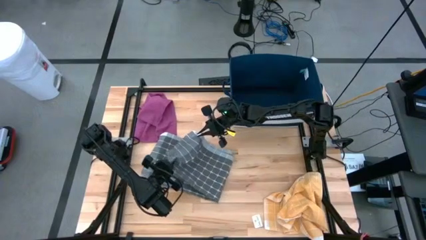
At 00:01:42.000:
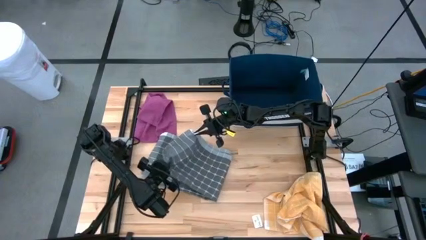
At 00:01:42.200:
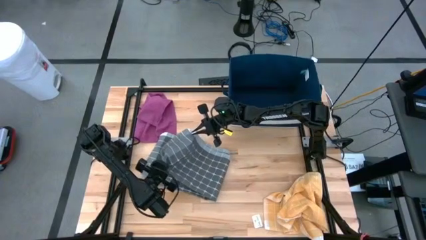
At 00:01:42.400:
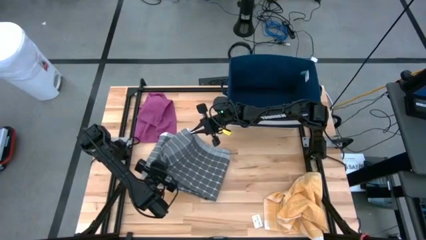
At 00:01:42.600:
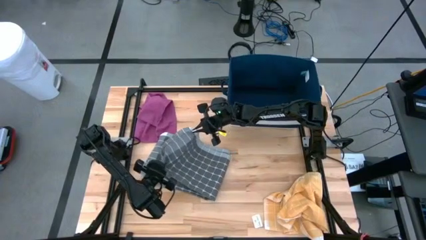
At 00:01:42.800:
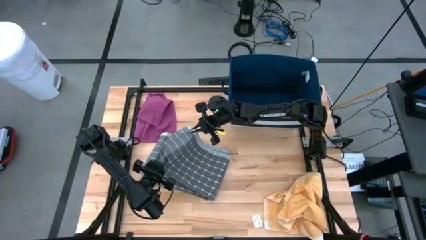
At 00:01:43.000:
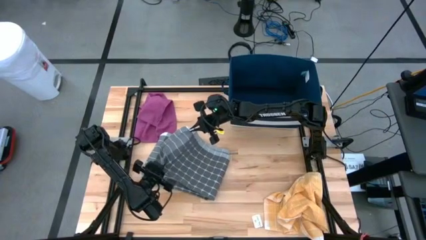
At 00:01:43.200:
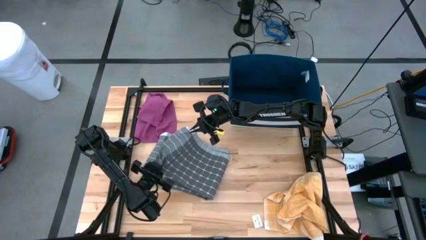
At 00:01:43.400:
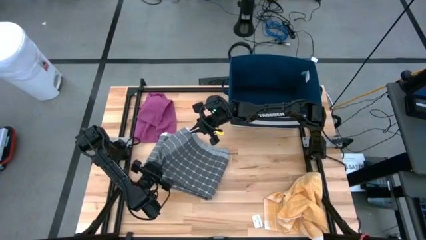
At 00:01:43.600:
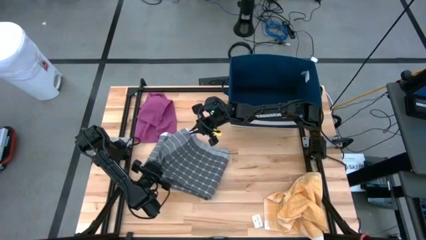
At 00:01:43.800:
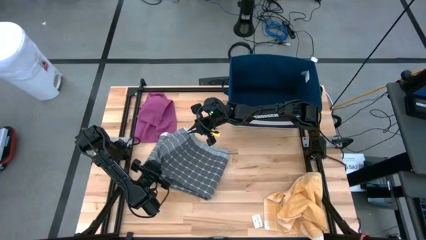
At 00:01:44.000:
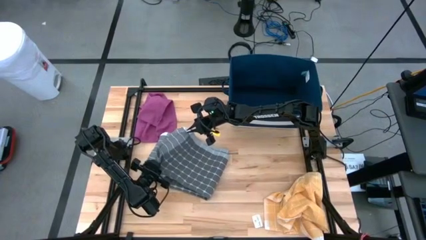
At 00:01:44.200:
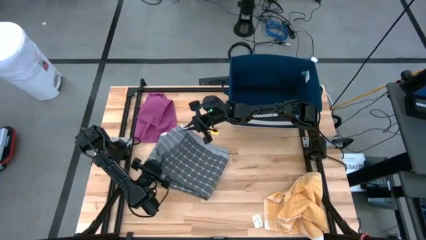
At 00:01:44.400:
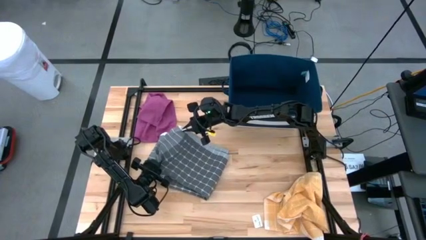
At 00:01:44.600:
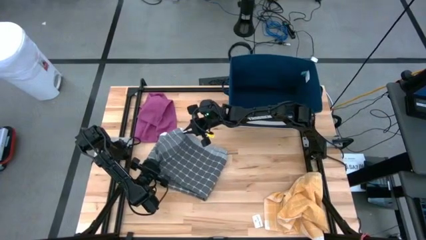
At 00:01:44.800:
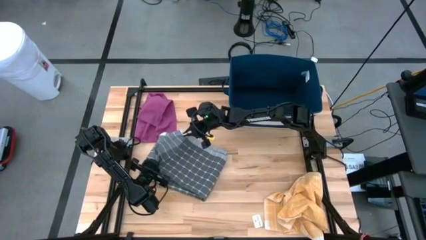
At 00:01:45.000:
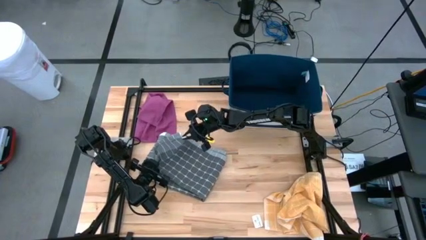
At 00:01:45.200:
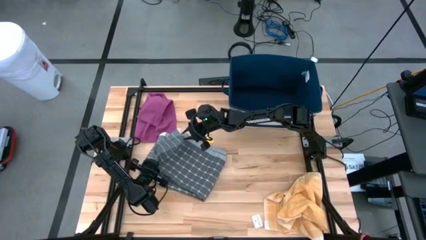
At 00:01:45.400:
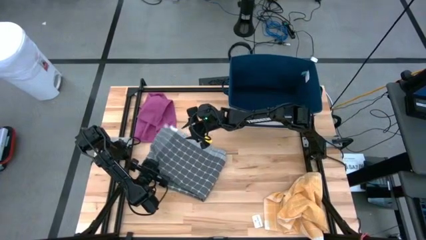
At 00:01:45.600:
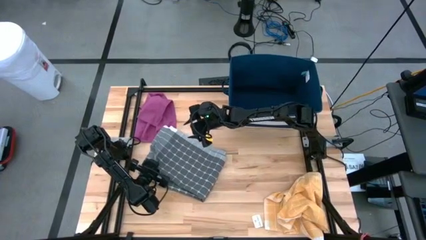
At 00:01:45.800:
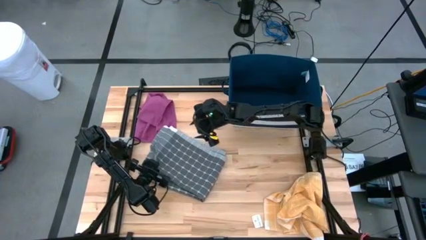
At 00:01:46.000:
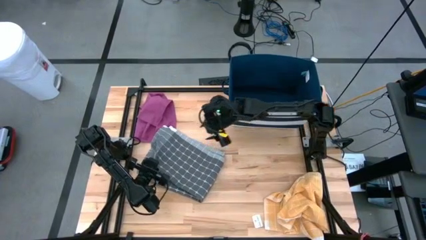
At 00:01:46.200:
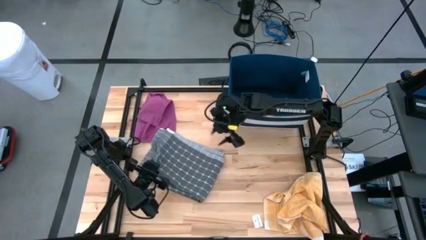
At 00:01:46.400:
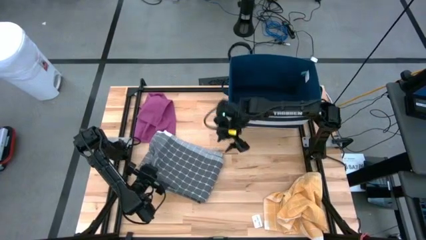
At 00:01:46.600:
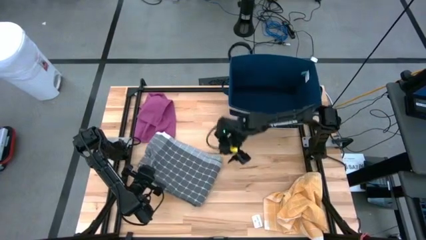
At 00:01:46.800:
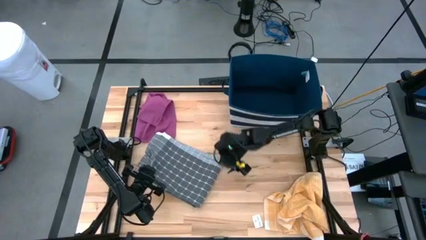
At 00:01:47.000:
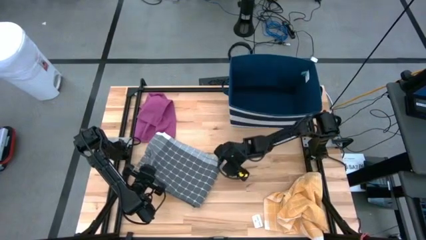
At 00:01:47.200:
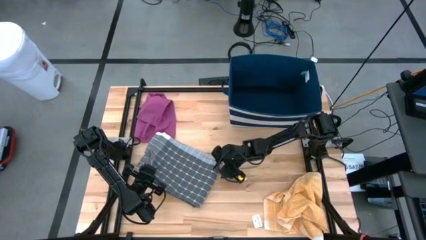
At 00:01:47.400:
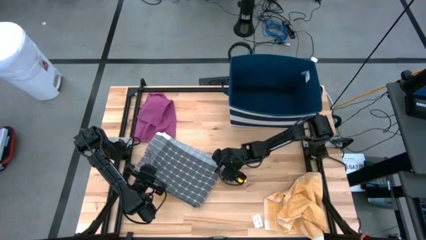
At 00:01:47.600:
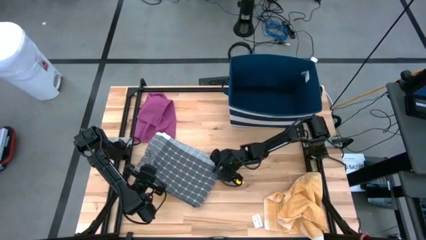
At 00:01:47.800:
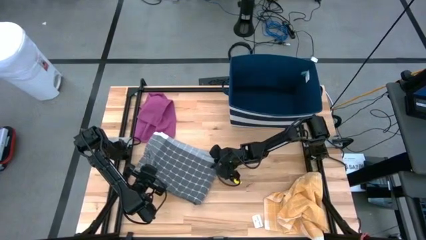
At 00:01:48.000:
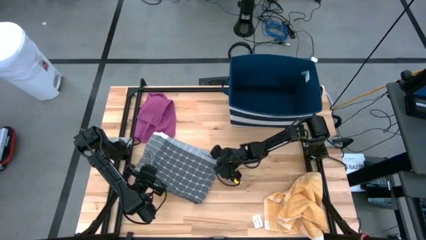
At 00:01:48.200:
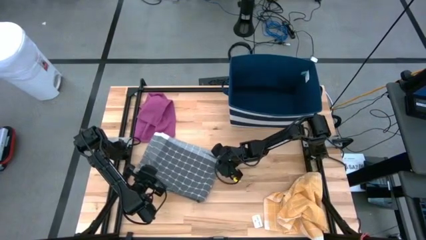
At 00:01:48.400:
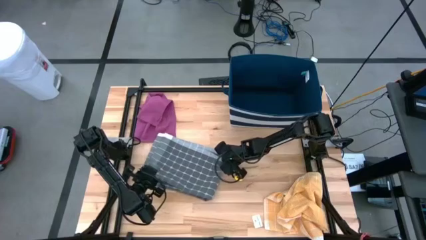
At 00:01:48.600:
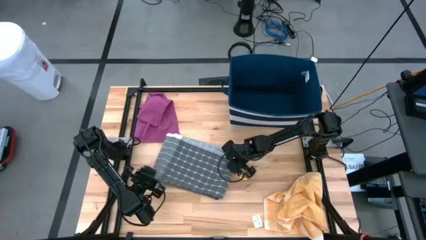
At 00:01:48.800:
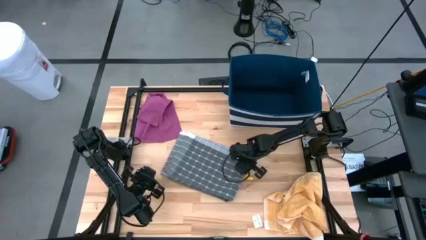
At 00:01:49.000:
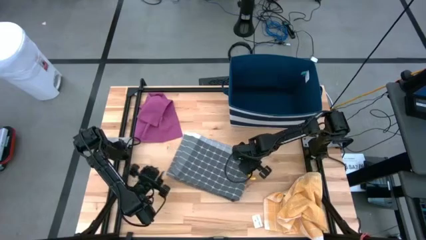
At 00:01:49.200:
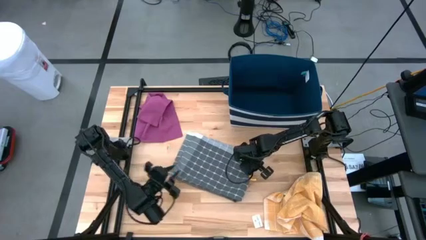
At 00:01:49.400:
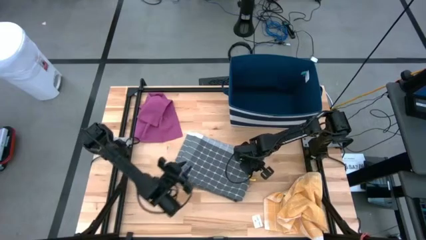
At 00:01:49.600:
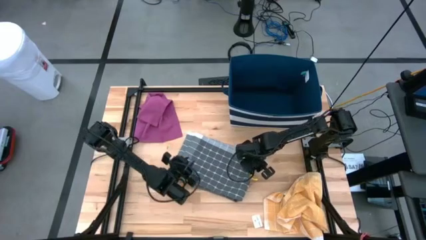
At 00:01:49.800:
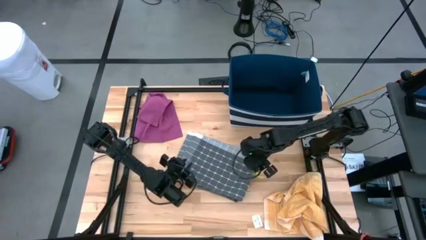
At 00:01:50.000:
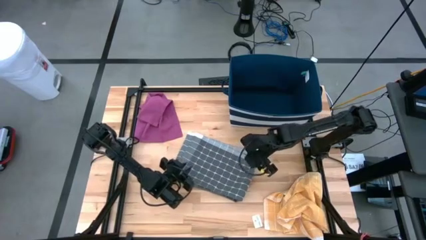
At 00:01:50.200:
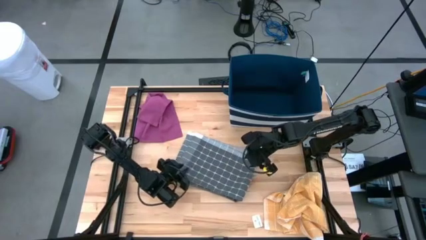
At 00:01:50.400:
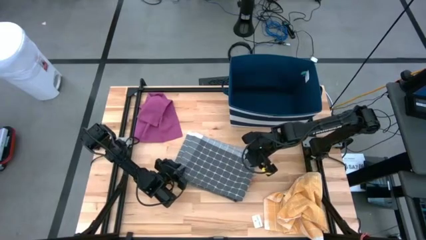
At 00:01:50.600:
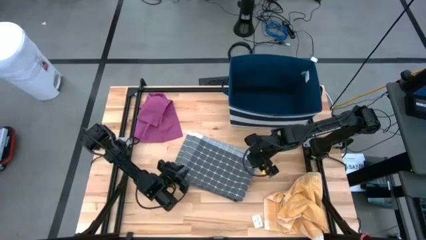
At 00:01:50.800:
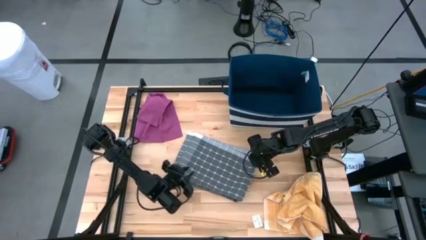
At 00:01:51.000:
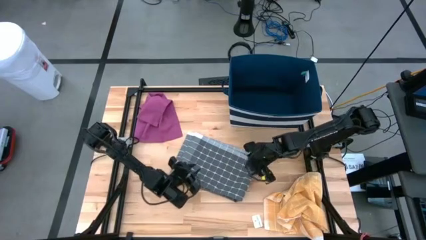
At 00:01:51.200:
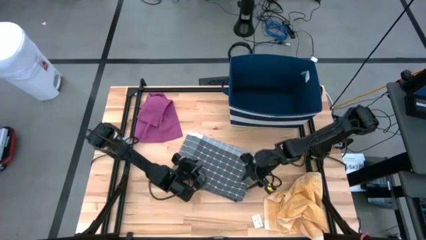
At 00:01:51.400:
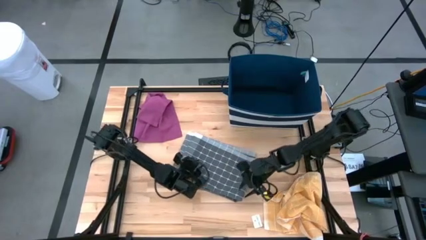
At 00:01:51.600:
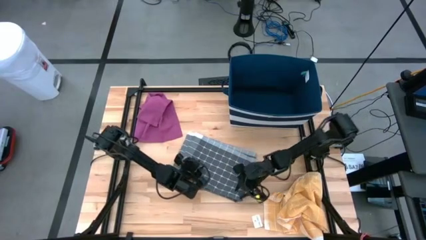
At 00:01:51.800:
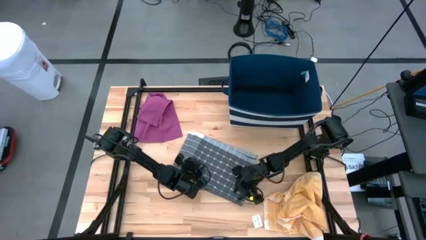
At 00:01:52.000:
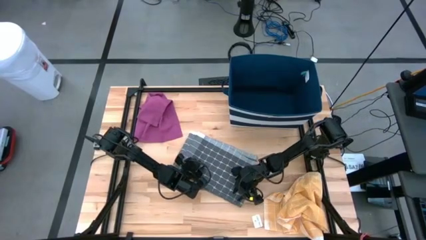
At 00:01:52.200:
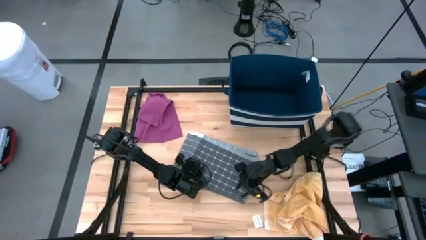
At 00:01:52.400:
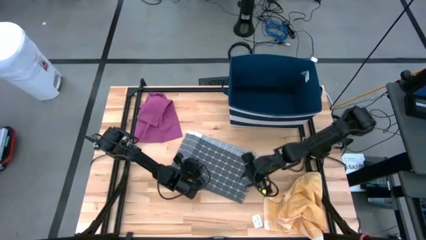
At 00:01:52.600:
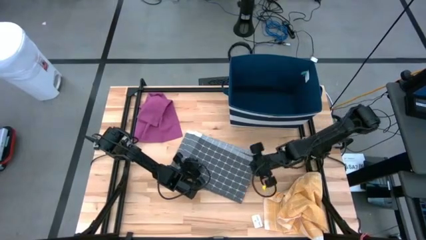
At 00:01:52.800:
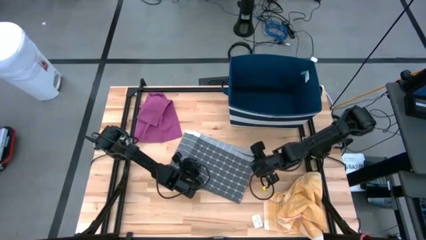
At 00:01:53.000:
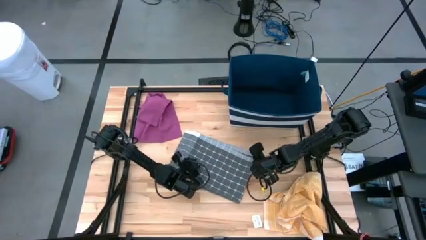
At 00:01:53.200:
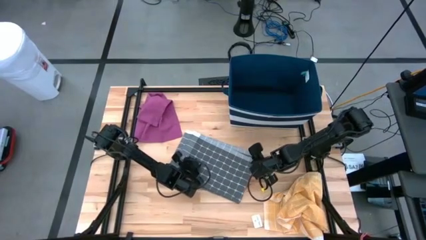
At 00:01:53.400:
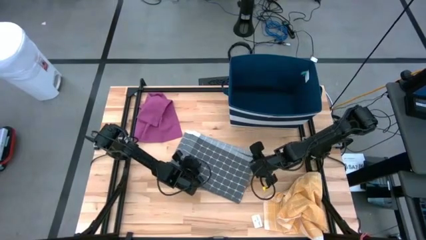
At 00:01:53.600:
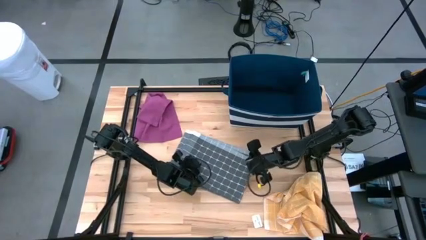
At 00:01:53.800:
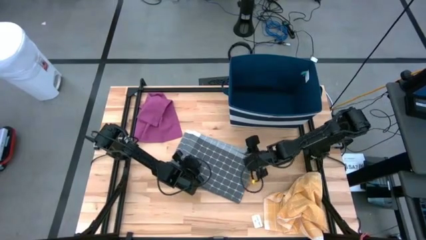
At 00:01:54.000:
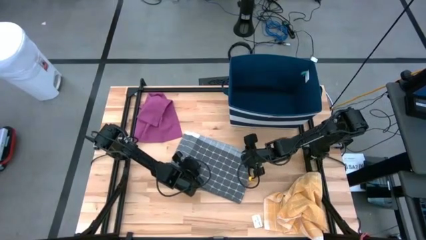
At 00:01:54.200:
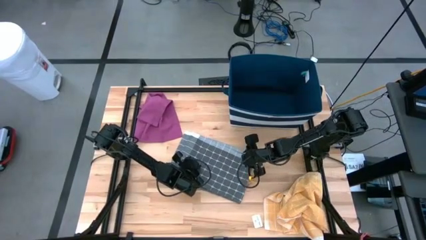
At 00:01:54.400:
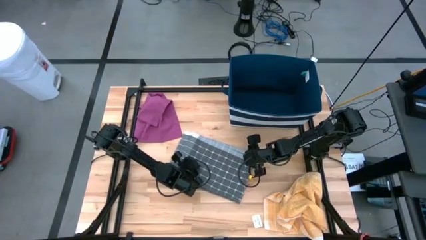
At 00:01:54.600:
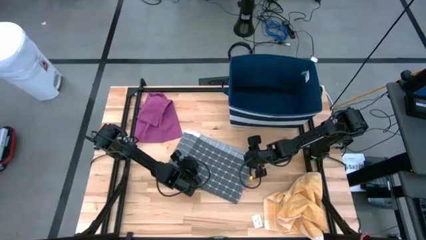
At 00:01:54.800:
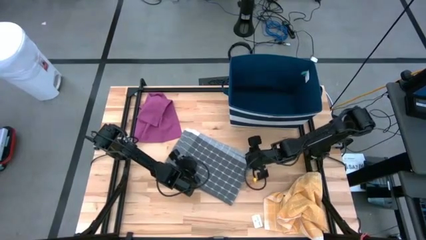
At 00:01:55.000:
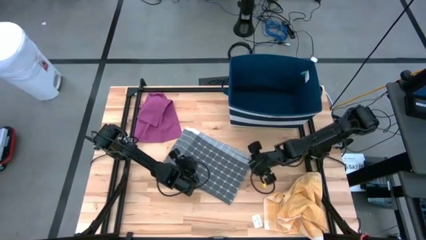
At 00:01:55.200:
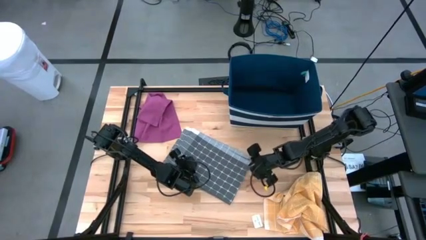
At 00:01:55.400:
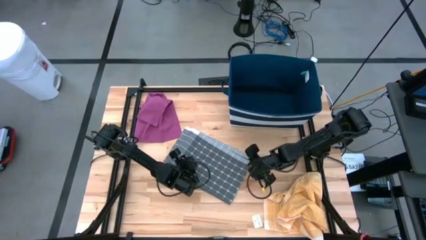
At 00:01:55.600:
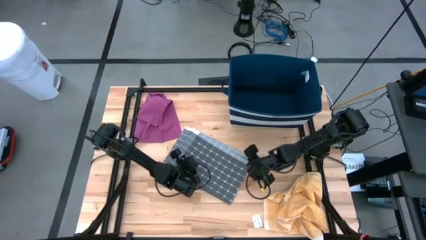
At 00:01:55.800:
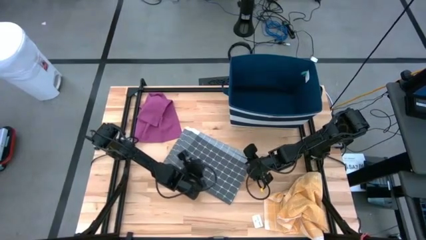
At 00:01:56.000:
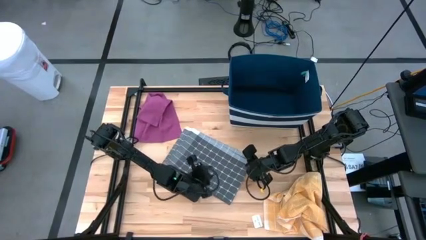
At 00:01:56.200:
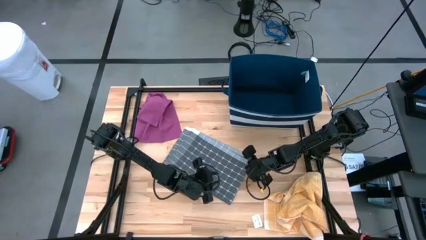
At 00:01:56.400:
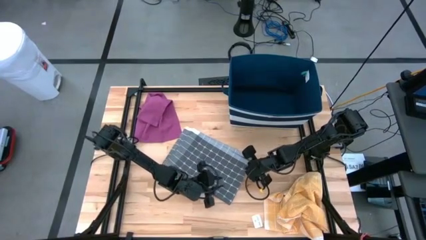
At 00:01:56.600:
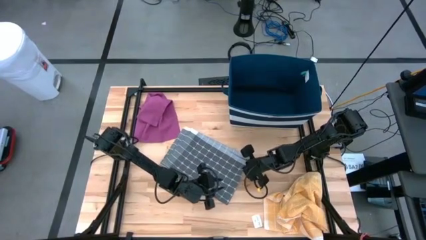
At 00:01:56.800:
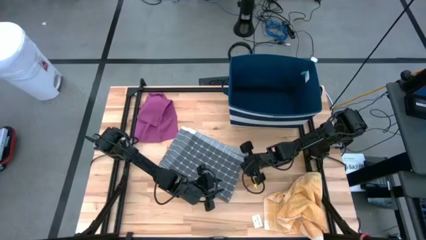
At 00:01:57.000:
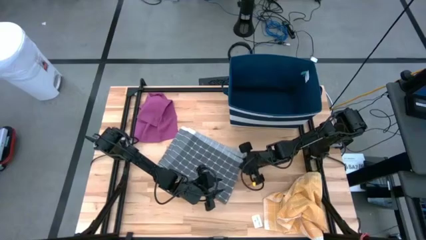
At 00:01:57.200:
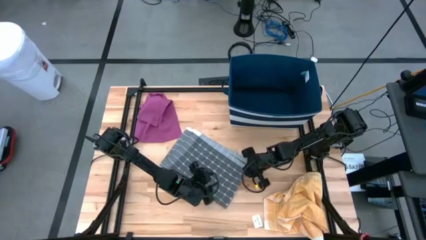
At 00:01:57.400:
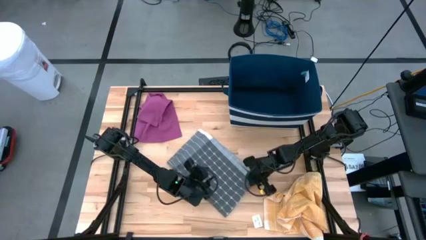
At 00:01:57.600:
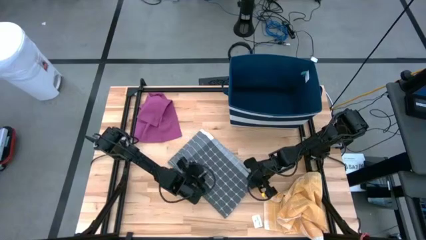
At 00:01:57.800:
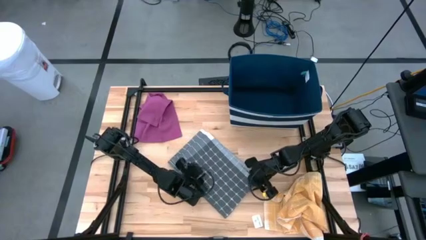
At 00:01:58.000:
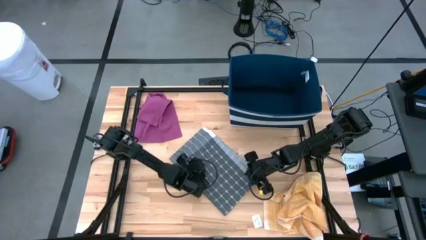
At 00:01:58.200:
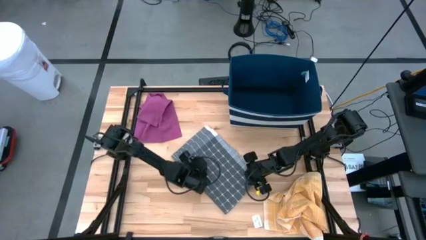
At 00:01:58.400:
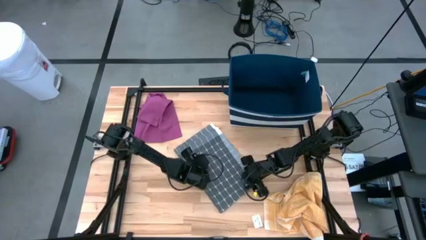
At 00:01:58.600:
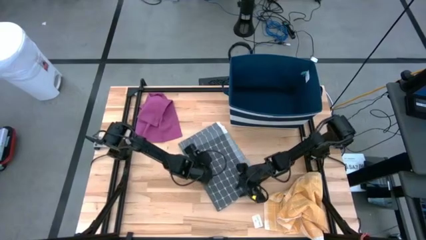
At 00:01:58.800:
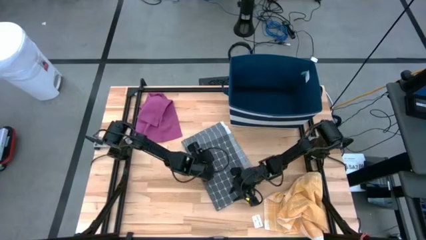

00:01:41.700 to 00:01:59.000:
Task: Fold towel
Fold the gray checkered towel
